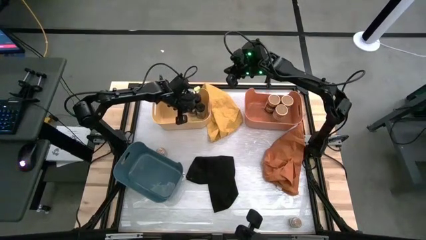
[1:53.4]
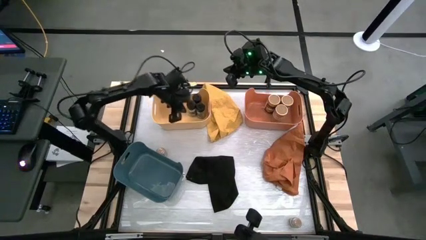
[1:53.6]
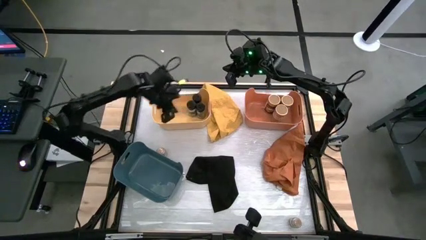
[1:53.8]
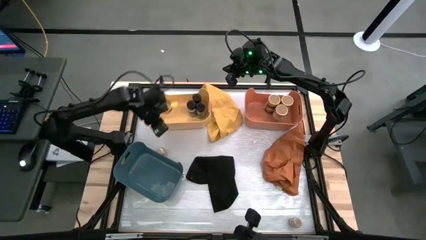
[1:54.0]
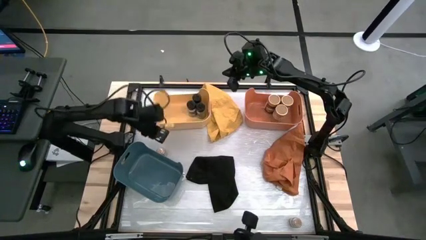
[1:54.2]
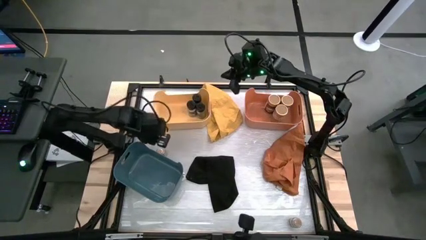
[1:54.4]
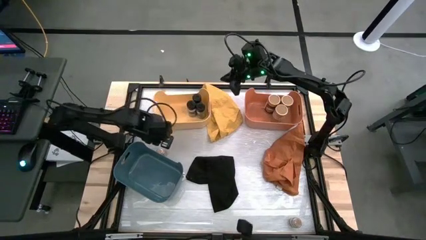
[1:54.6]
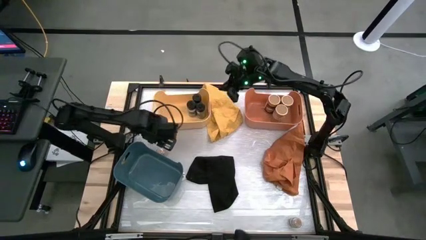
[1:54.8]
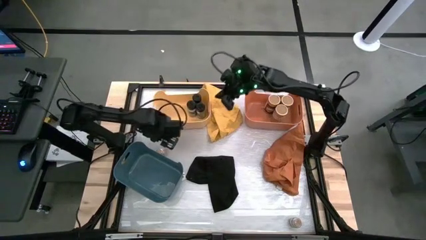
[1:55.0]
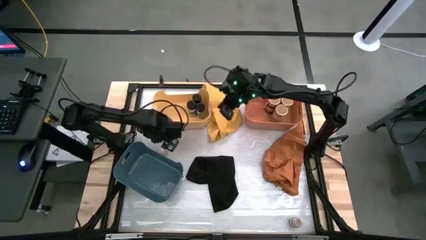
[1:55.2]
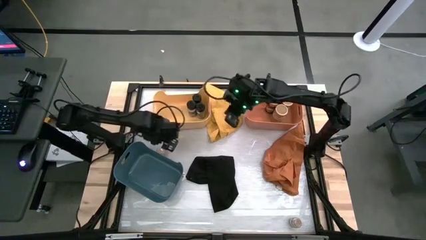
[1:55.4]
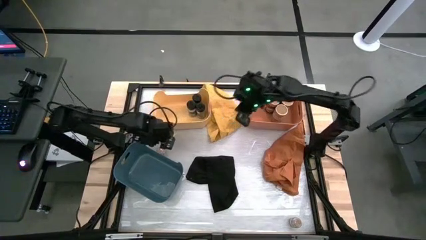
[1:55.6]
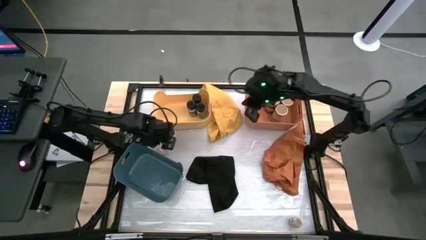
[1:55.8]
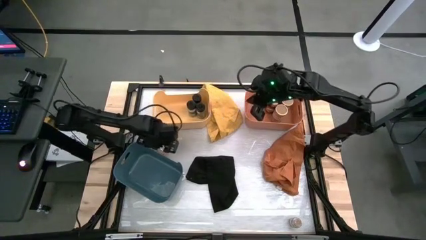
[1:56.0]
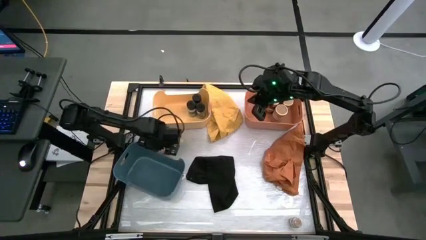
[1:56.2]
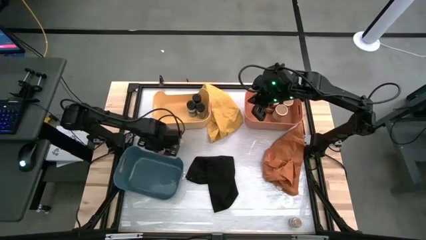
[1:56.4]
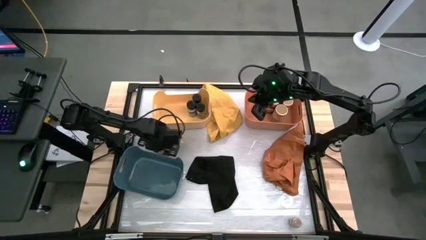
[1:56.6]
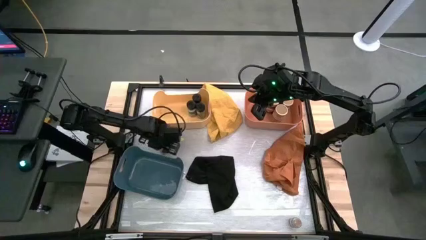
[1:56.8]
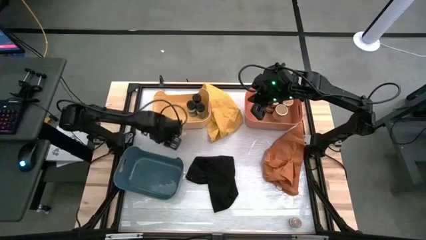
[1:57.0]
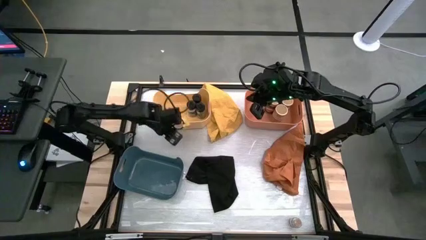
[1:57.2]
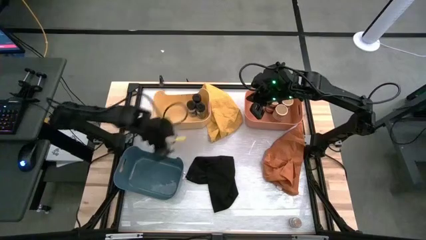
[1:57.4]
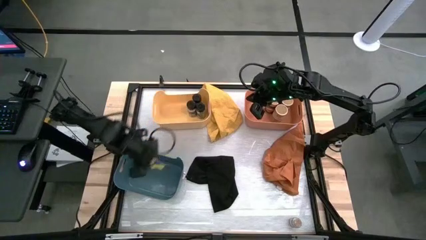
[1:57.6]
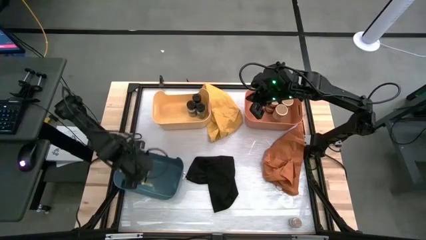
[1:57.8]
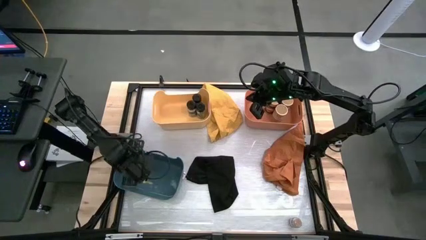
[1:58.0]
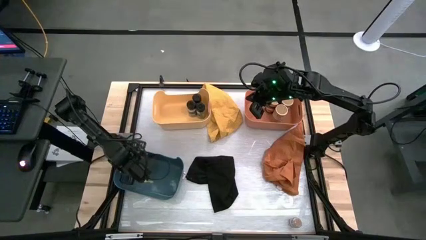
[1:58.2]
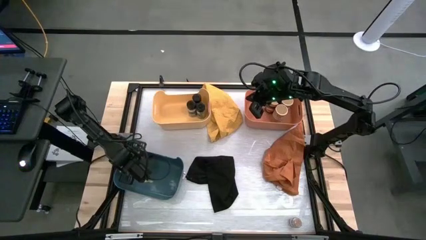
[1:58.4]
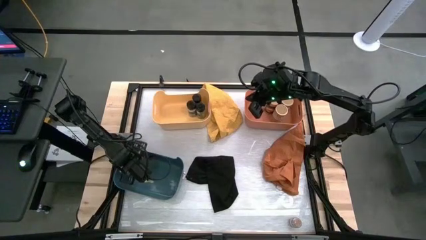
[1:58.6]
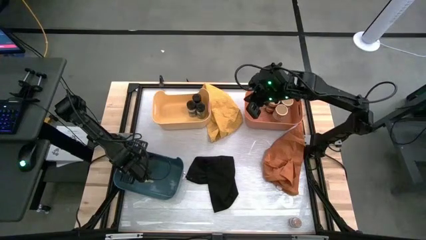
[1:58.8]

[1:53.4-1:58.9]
Task: Sort spices by type
Put the top brown spice bottle into the blue bin

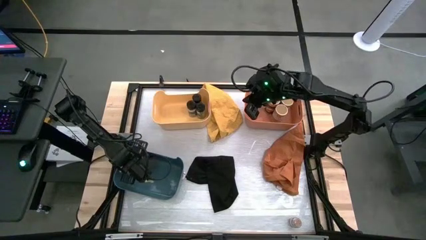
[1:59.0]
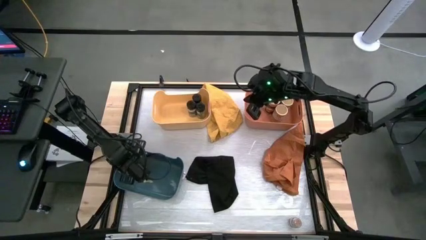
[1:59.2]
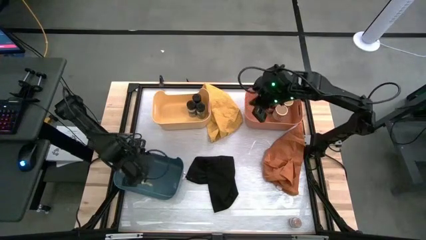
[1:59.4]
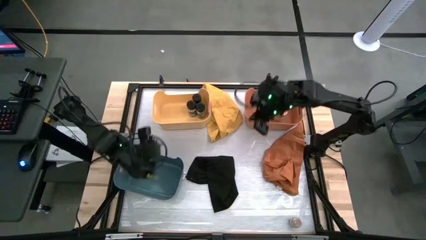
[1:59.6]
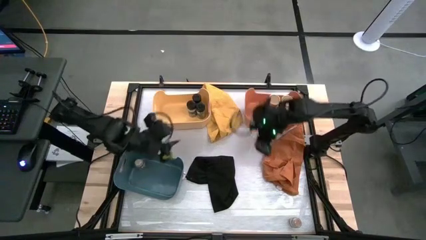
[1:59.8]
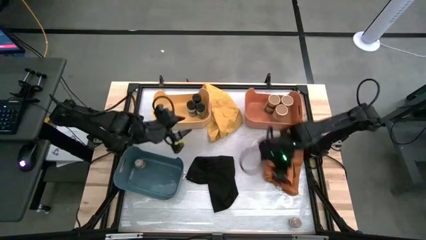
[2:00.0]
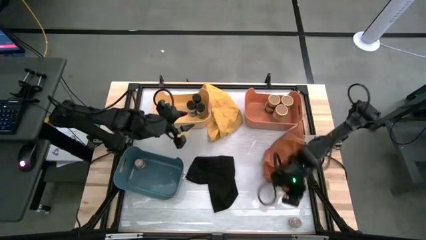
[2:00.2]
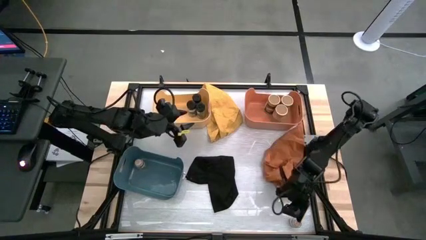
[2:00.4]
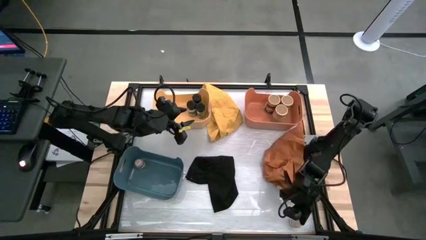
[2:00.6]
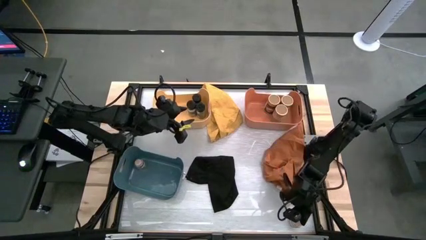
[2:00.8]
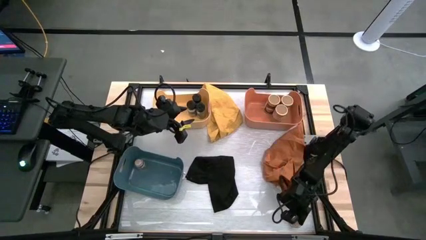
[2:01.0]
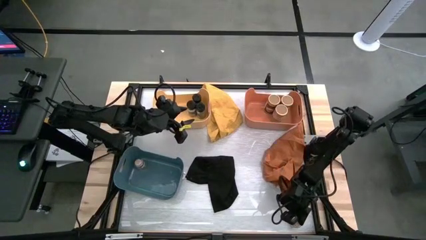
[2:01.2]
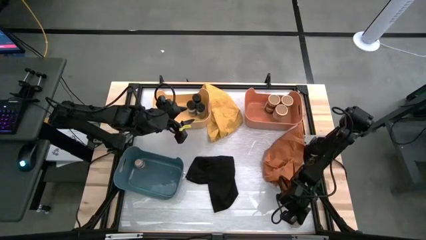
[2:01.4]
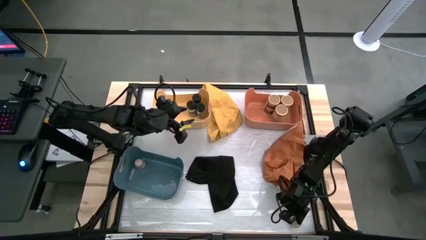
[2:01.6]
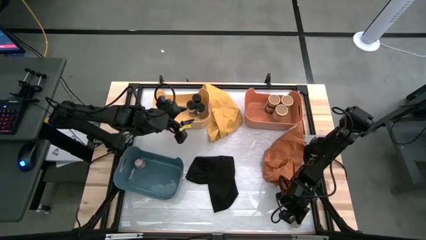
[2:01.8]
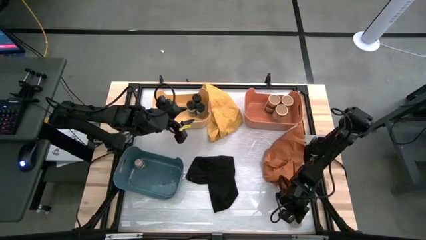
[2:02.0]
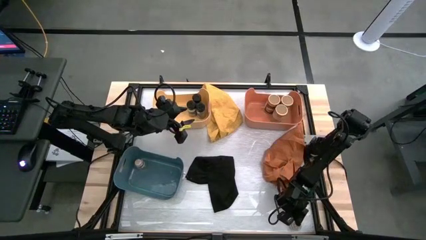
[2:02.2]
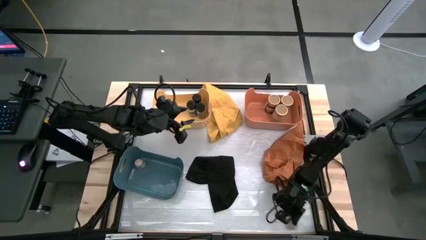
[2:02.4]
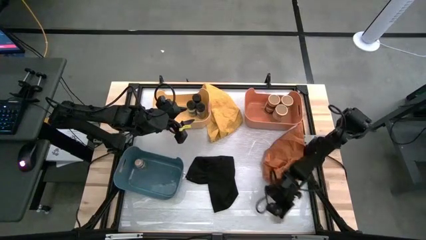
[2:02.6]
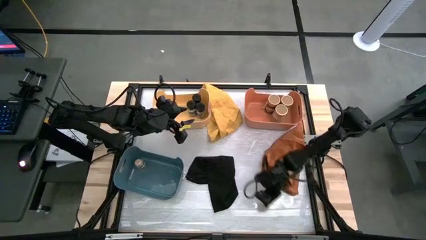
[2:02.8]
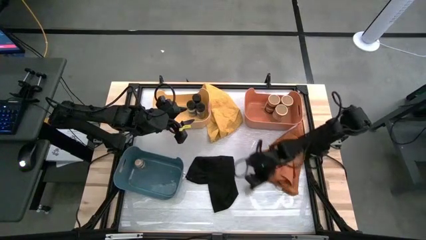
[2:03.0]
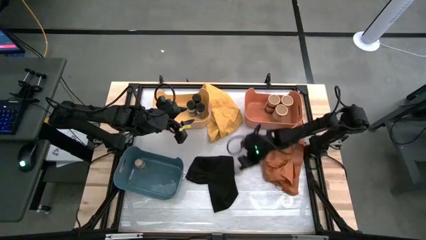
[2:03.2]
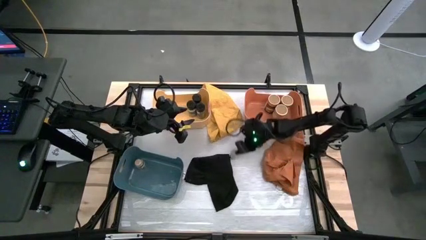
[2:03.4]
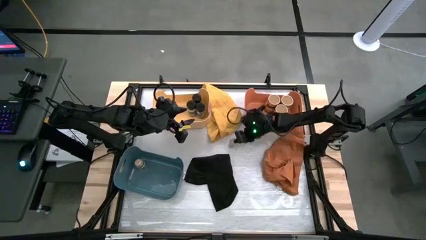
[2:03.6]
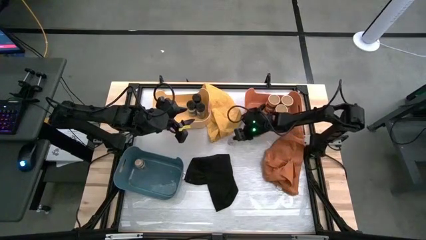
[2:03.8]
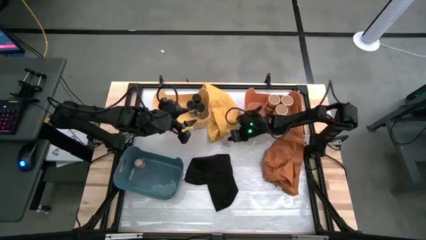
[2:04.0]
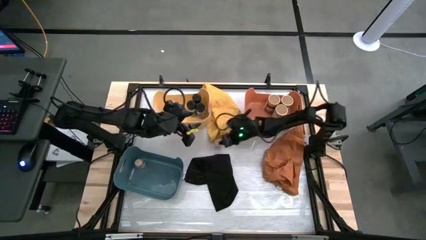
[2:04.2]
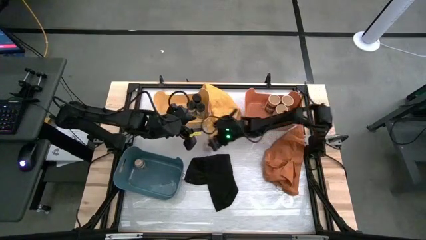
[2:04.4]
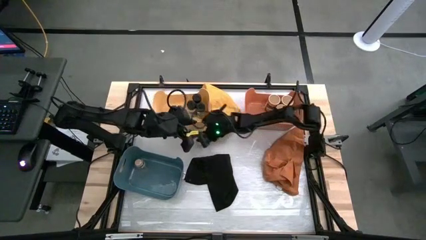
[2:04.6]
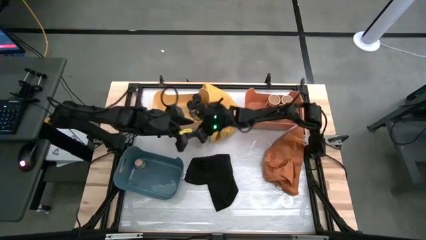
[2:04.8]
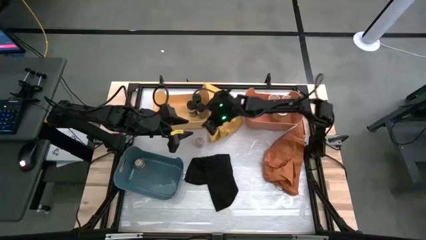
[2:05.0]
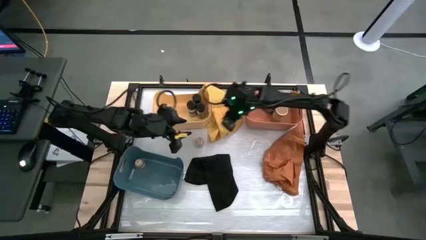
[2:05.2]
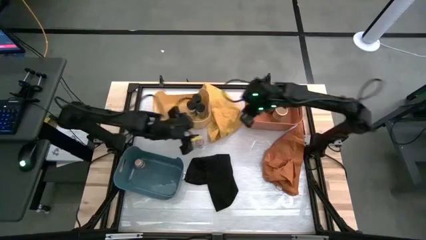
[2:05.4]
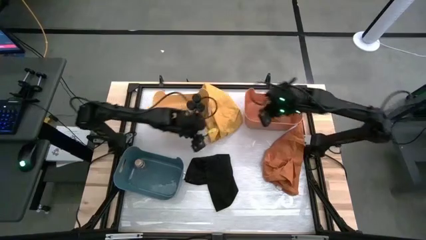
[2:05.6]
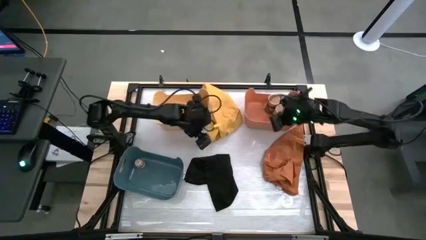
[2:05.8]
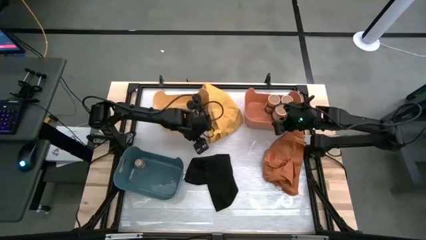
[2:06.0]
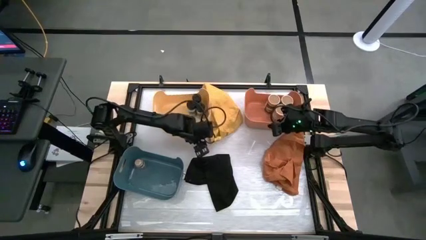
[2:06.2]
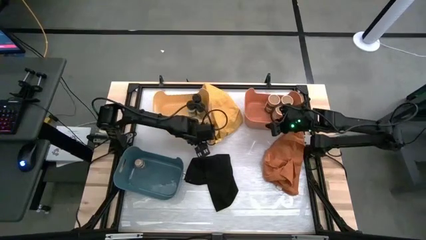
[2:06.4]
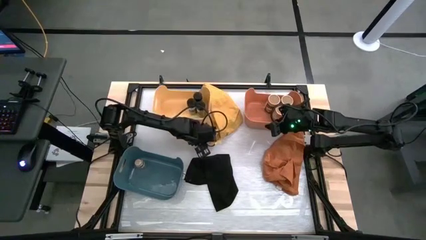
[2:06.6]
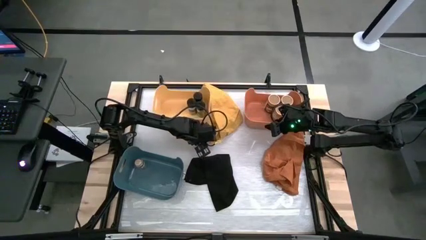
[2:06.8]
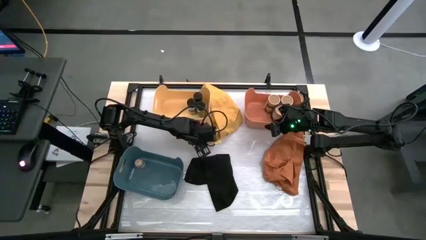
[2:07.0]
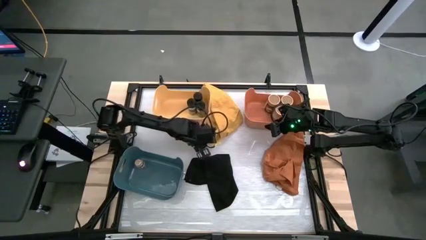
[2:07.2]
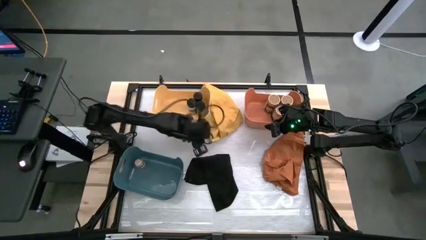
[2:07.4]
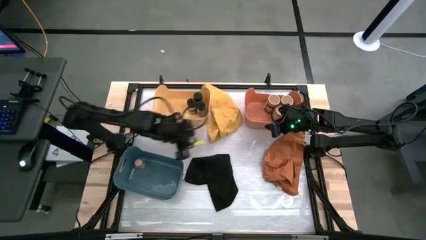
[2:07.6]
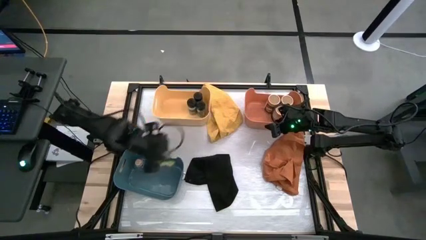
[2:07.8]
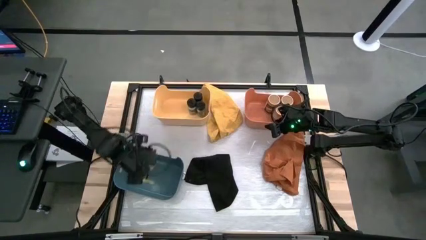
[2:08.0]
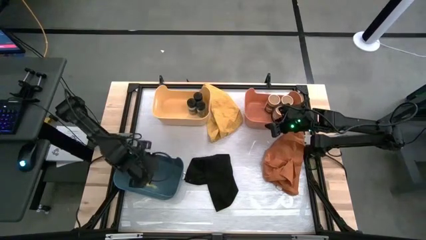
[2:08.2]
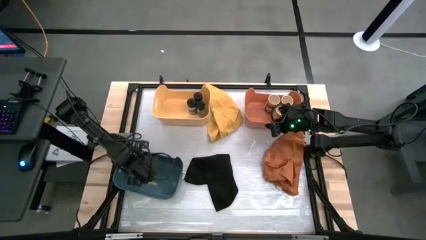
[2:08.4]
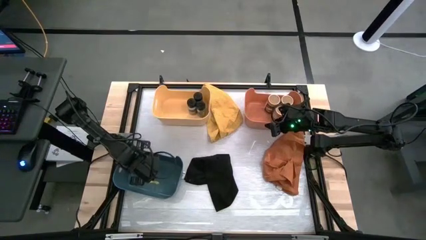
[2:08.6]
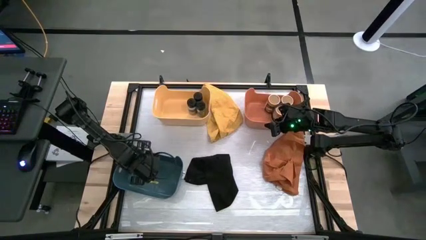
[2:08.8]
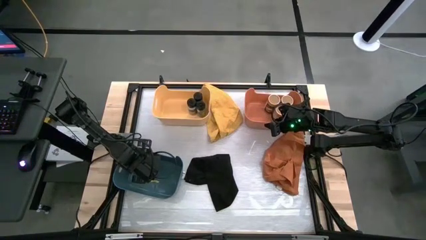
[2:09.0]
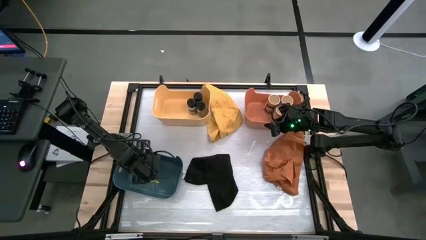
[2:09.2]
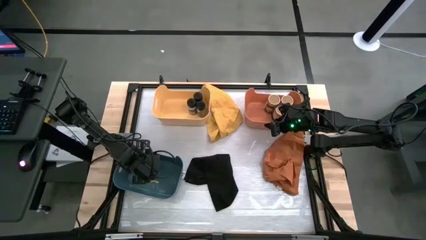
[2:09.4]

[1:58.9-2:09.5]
Put the brown spice bottle into the blue bin
